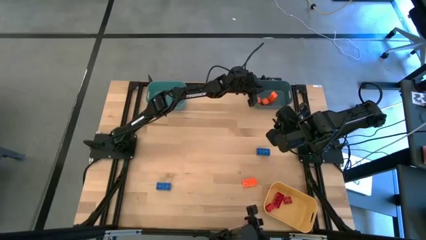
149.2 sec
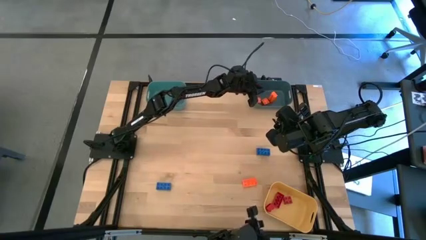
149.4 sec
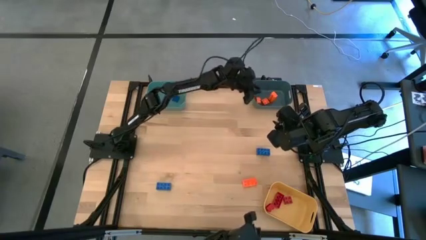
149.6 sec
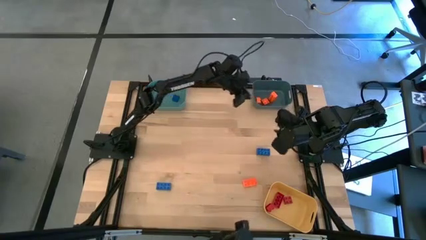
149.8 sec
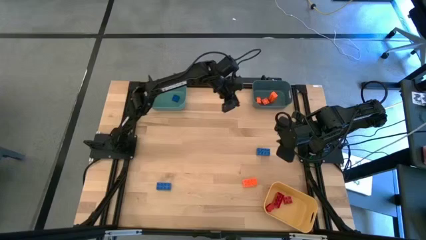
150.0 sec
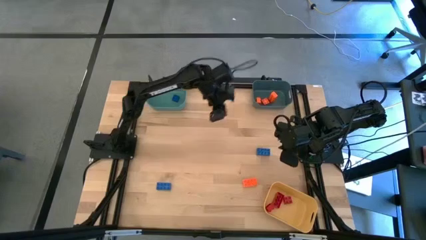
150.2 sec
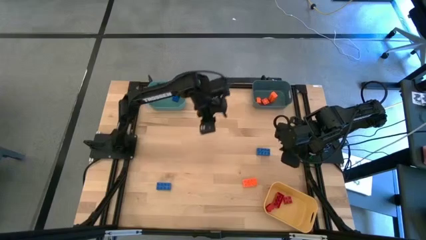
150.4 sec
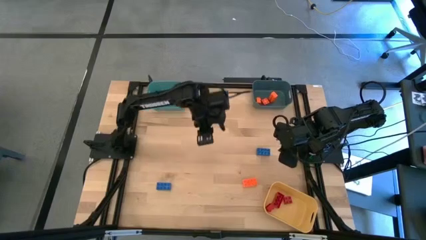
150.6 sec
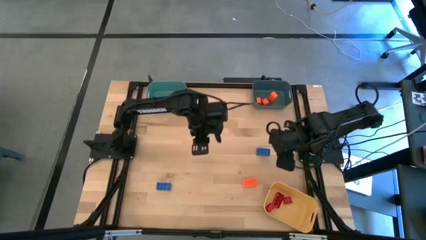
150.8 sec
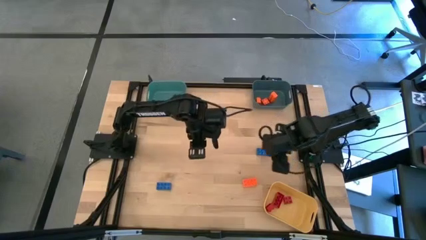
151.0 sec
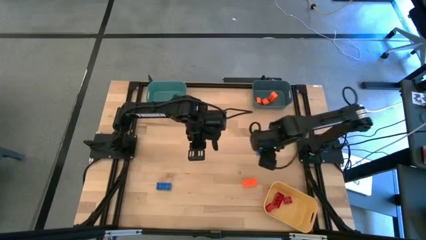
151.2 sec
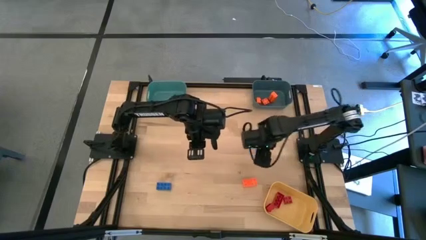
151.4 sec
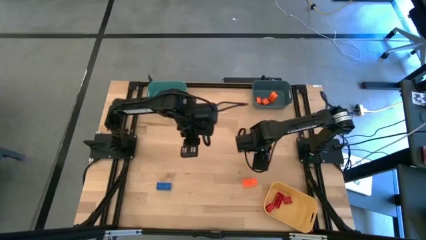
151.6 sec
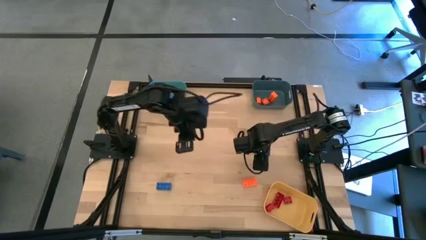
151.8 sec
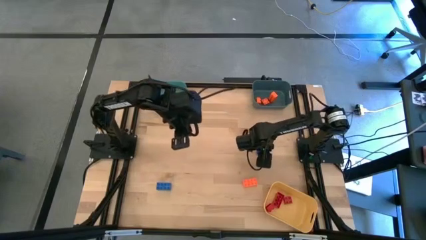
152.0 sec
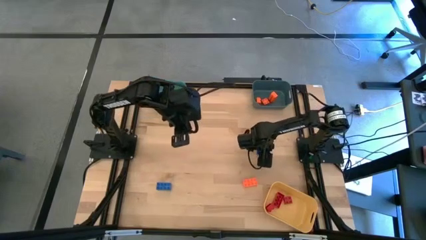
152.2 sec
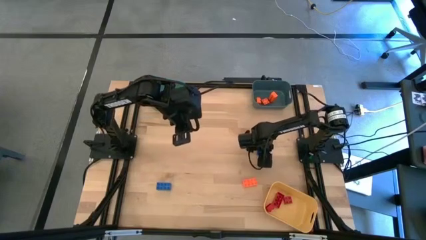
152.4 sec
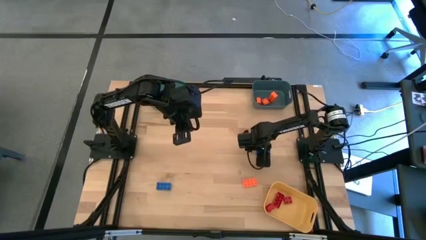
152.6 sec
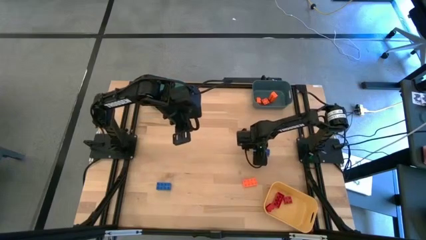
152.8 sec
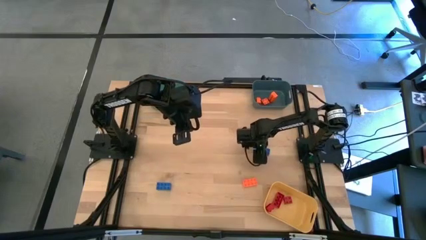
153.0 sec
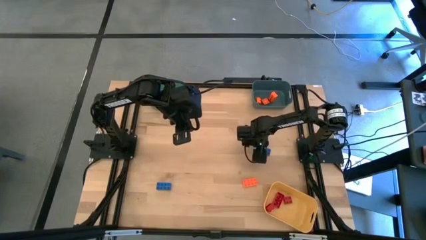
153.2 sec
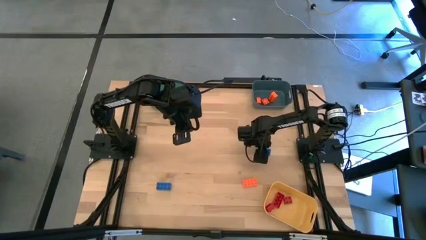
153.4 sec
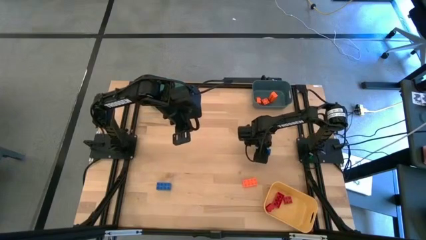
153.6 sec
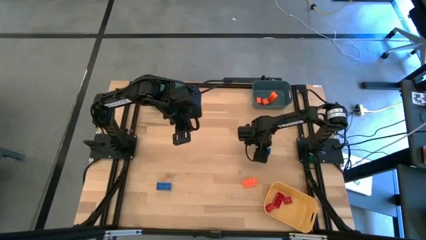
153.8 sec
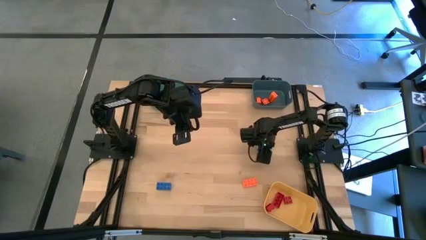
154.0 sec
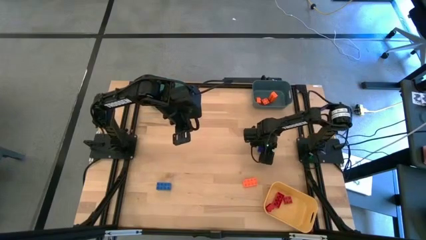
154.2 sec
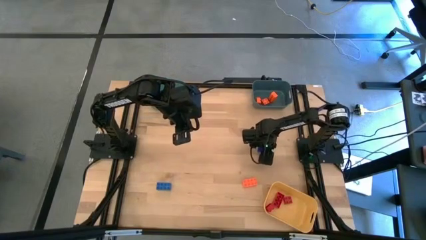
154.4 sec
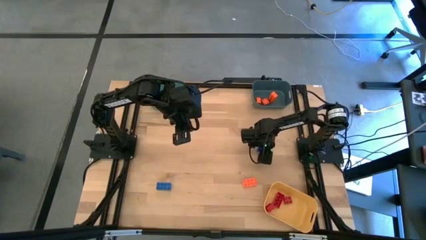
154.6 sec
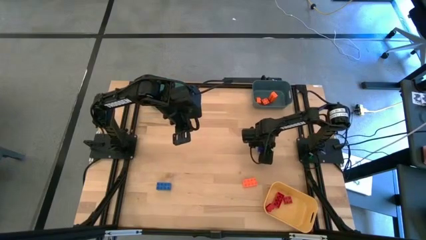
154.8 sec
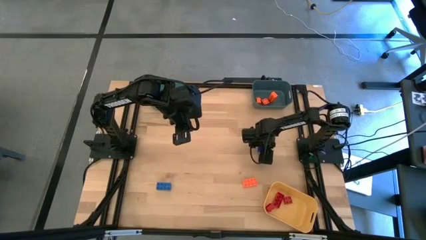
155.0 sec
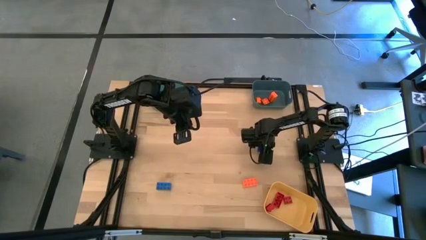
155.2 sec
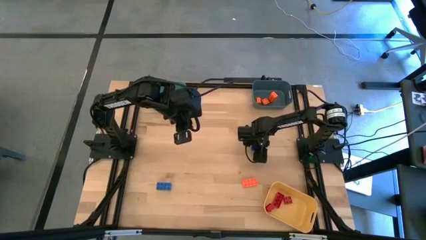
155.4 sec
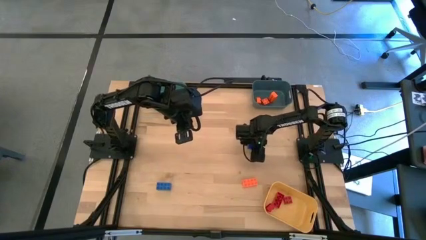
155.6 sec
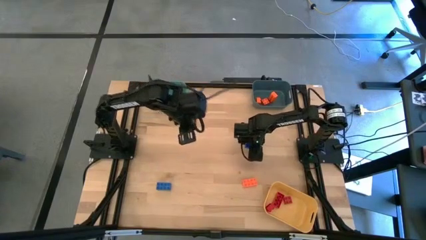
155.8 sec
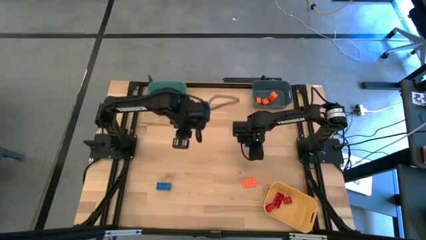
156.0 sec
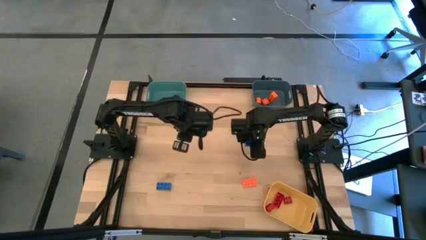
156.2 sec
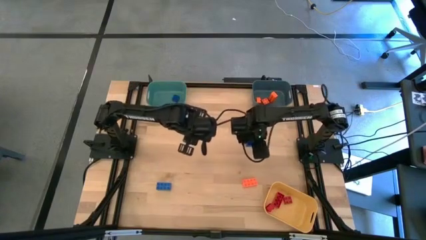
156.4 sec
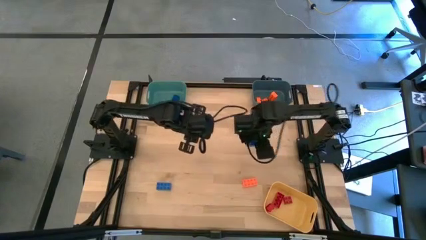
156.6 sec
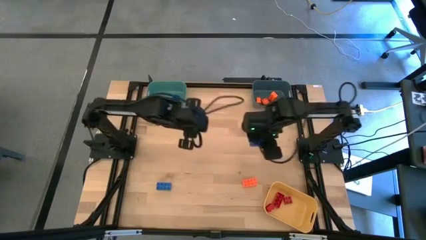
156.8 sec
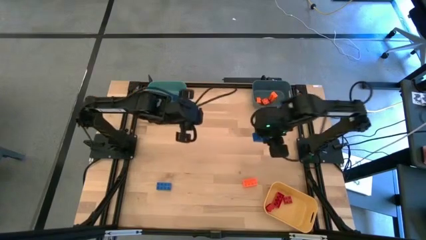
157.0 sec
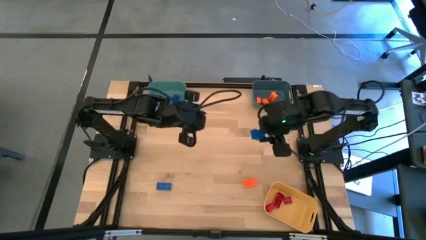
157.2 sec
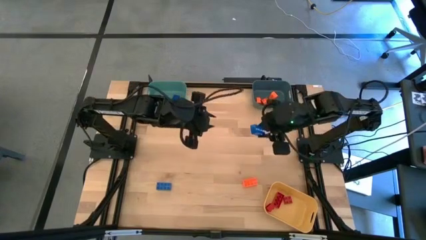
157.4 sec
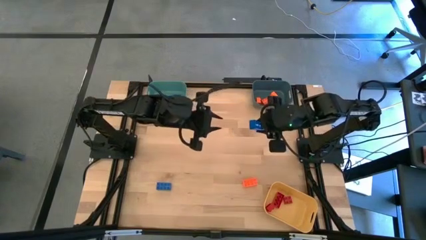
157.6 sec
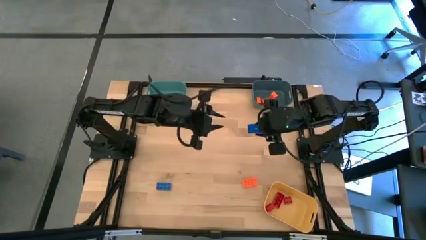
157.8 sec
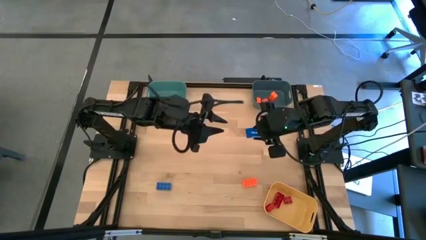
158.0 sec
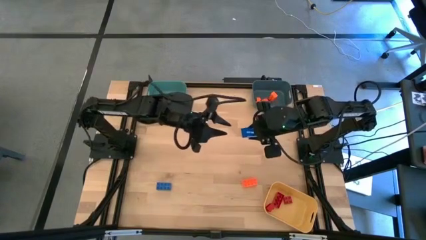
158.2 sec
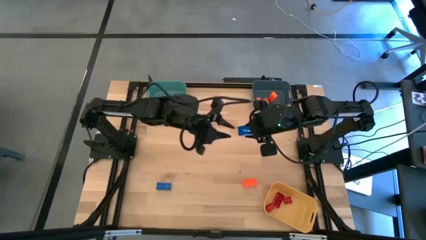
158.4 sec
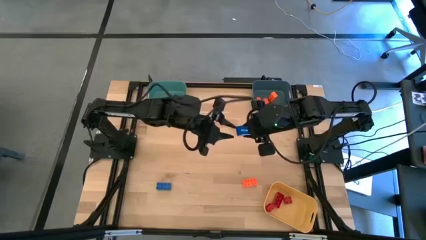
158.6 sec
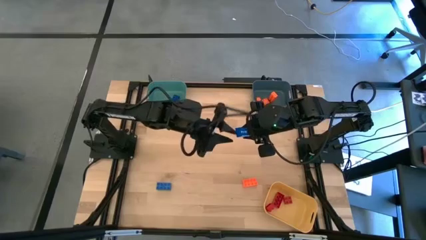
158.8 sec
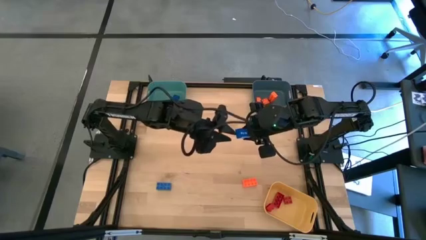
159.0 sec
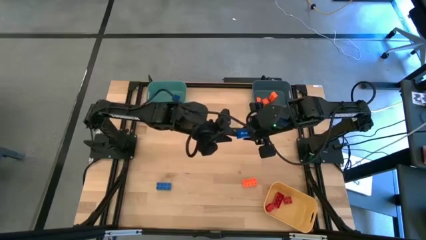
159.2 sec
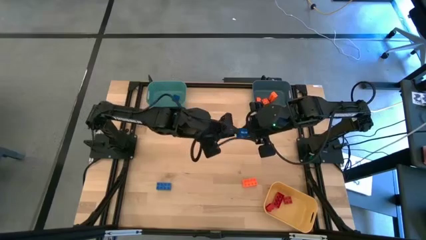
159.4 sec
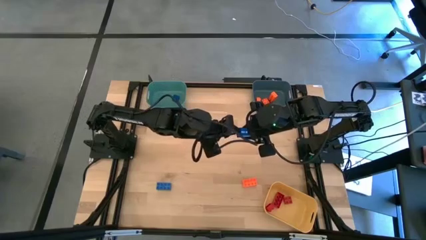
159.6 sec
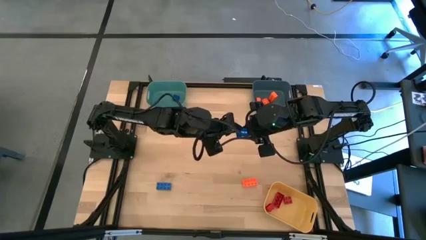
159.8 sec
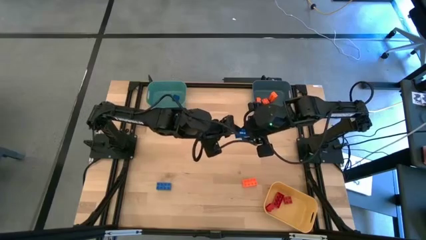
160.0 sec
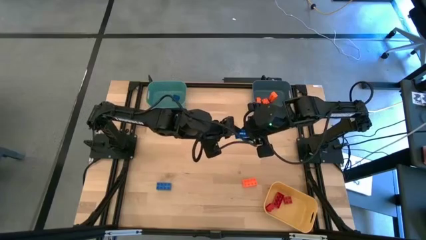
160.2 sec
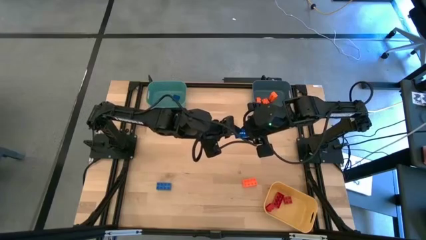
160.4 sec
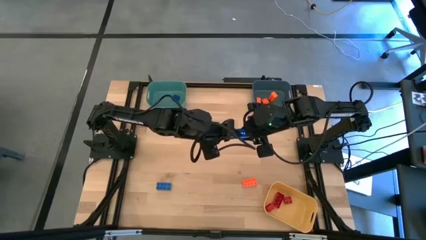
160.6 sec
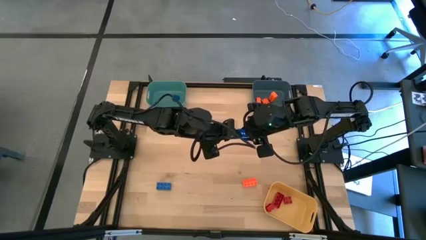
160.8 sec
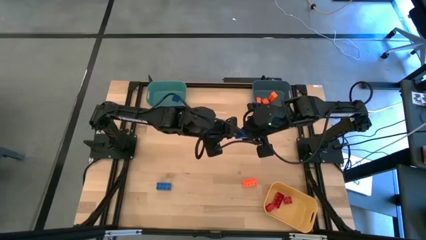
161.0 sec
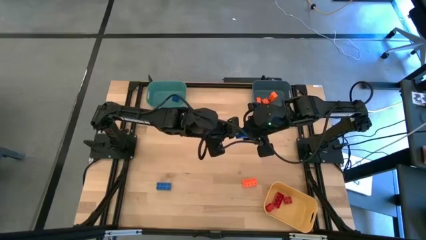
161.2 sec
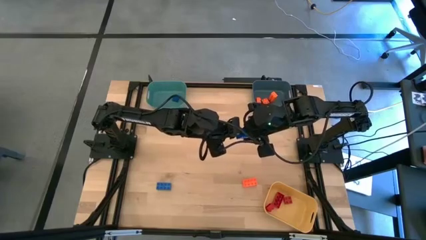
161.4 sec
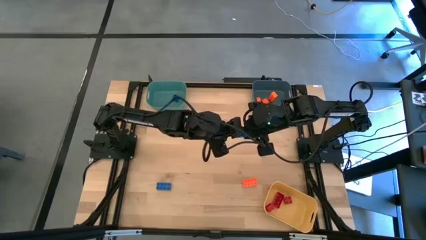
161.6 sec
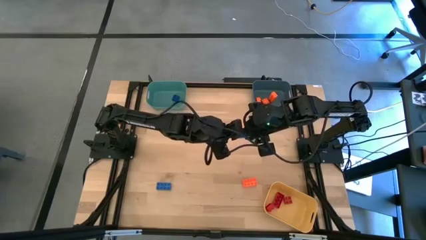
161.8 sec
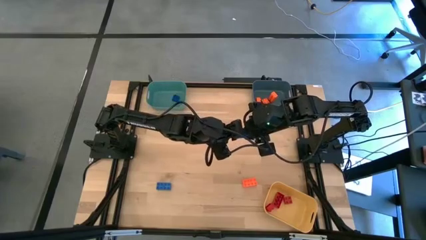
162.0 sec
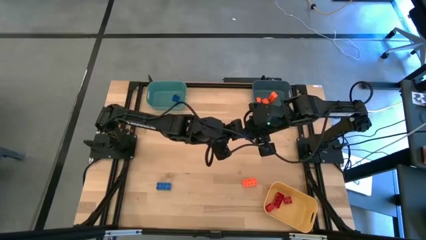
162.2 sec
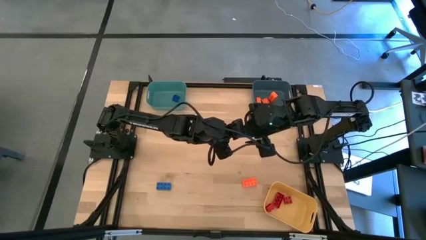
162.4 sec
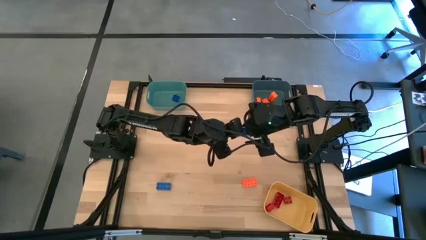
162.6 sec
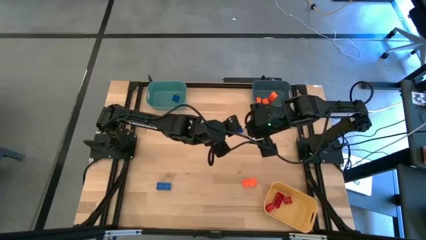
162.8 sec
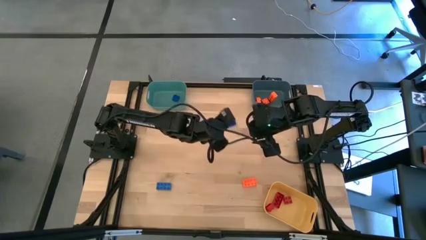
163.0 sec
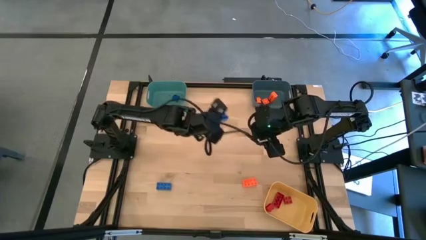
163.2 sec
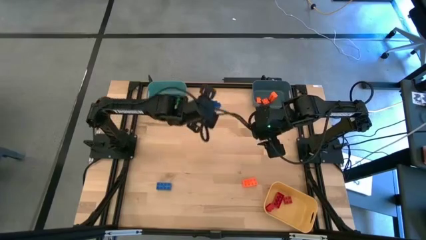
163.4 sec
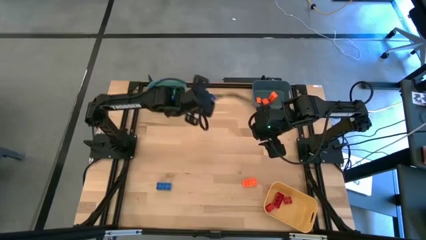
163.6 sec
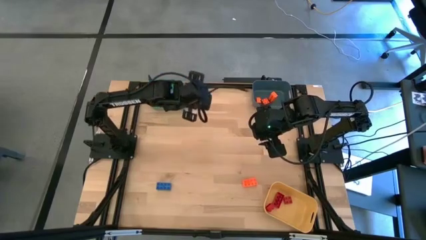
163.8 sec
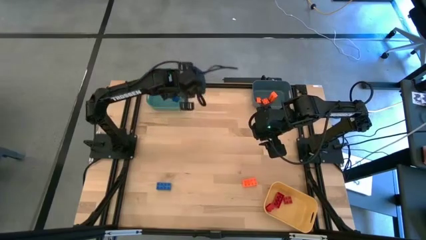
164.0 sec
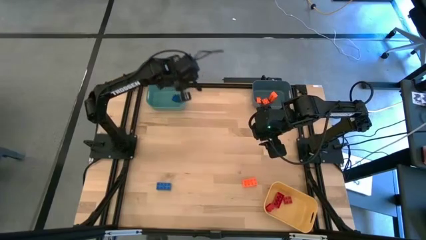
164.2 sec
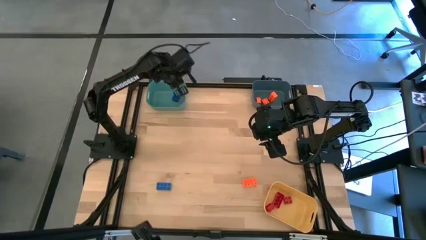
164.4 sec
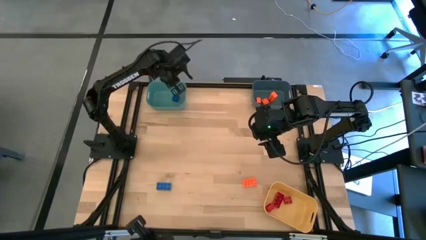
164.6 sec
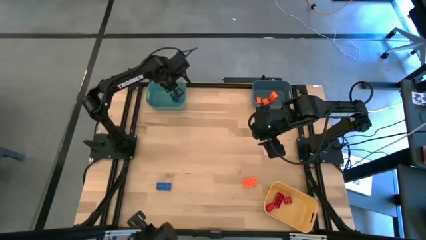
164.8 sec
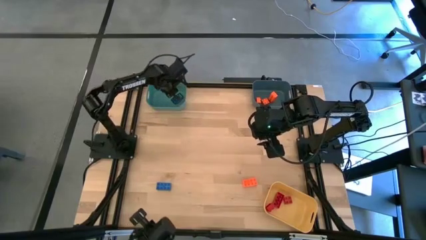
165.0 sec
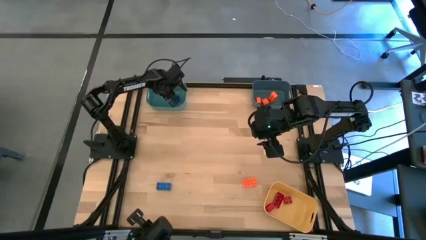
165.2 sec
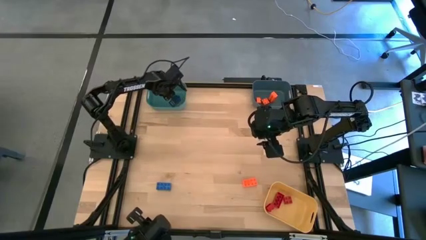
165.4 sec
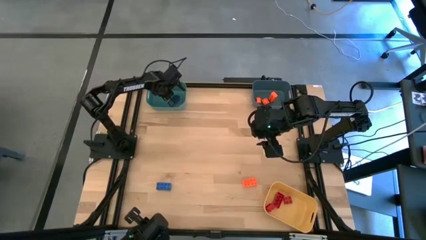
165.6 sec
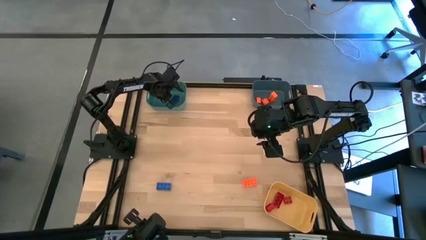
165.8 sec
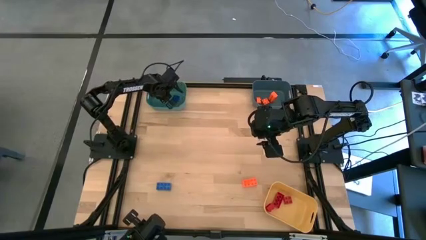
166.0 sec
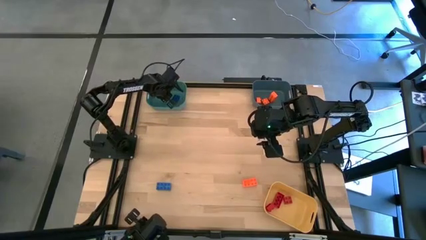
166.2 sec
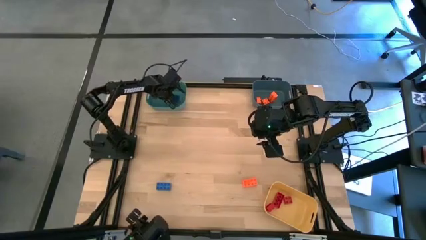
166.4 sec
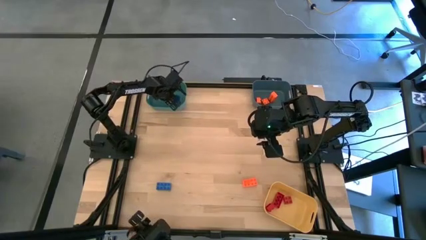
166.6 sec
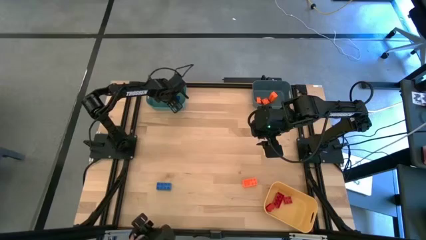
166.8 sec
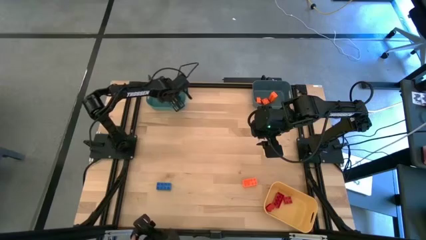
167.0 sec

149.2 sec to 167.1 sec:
Task: Sort & place blocks by color
Put the blue game piece into the green bin
